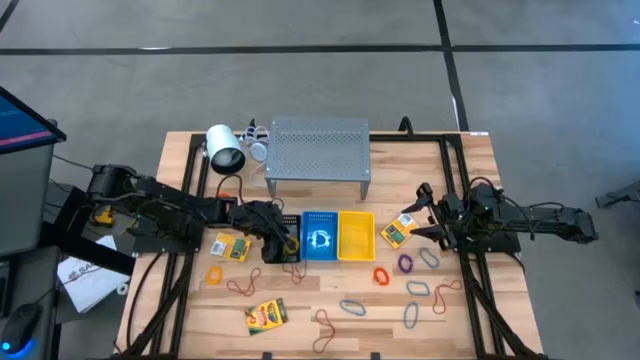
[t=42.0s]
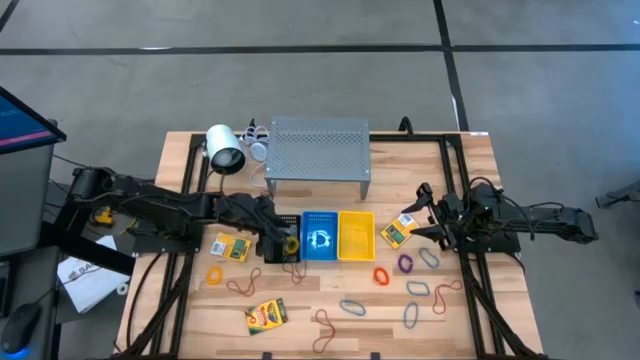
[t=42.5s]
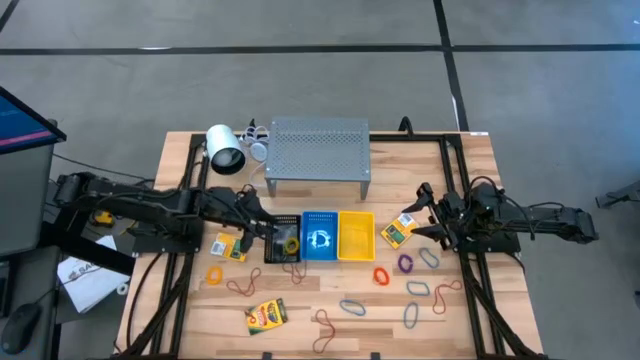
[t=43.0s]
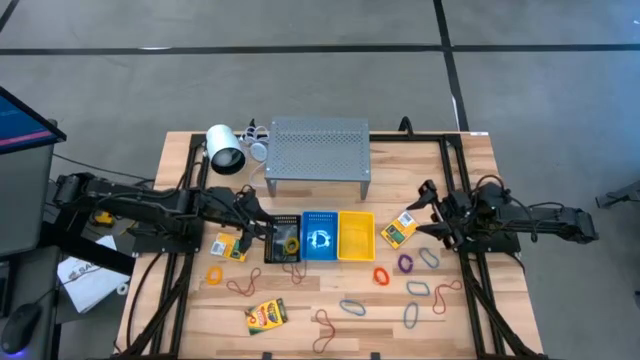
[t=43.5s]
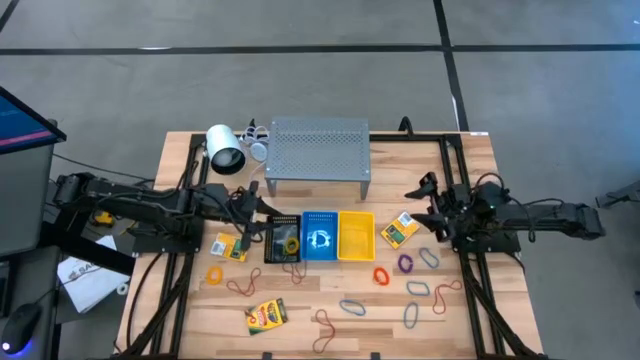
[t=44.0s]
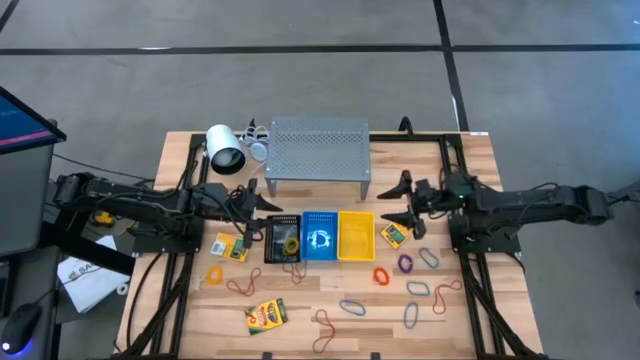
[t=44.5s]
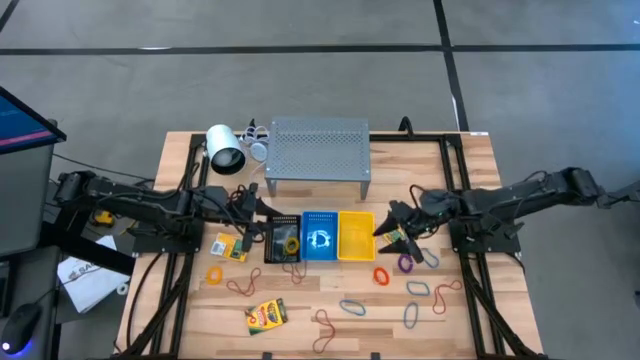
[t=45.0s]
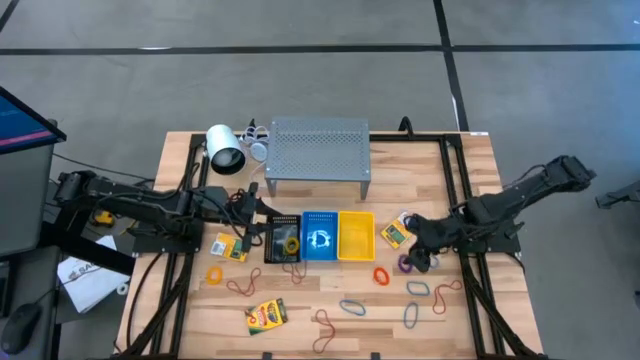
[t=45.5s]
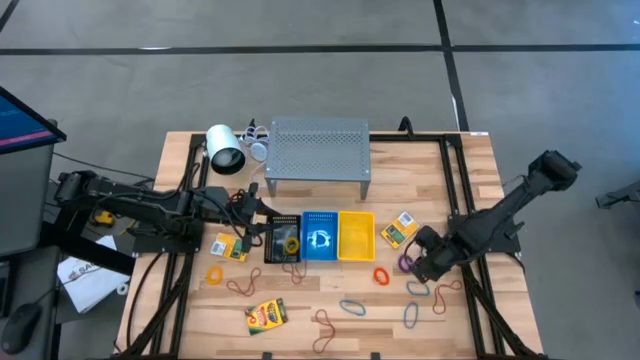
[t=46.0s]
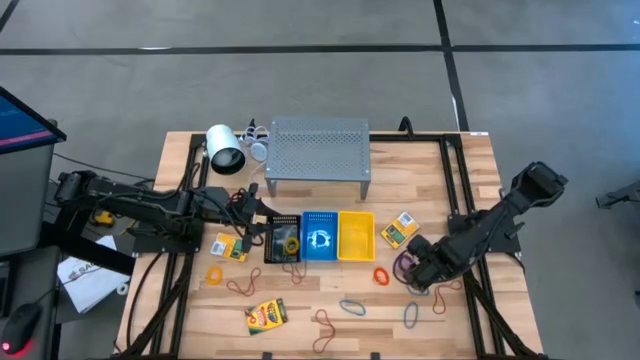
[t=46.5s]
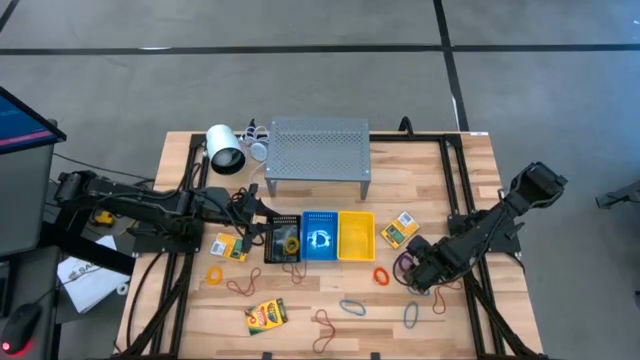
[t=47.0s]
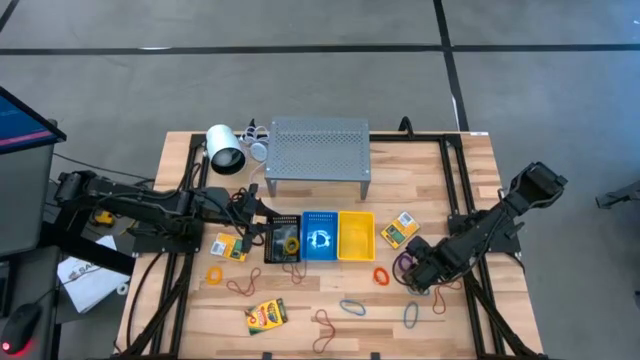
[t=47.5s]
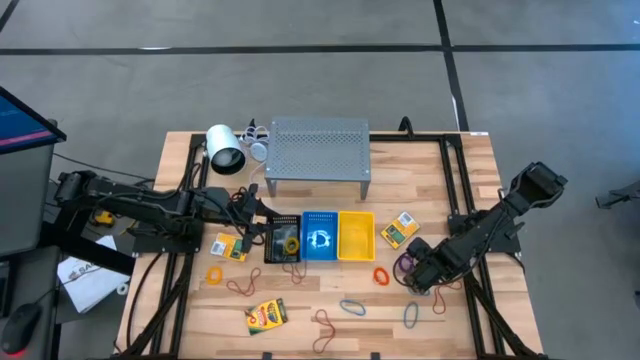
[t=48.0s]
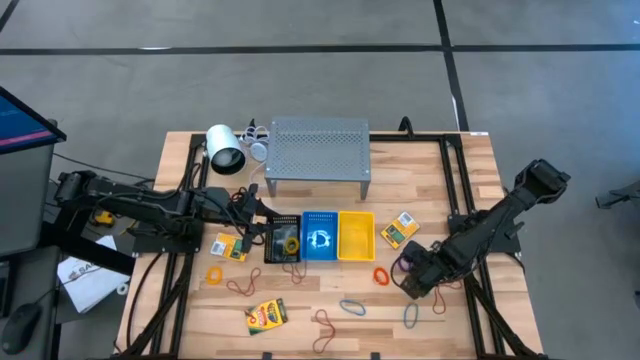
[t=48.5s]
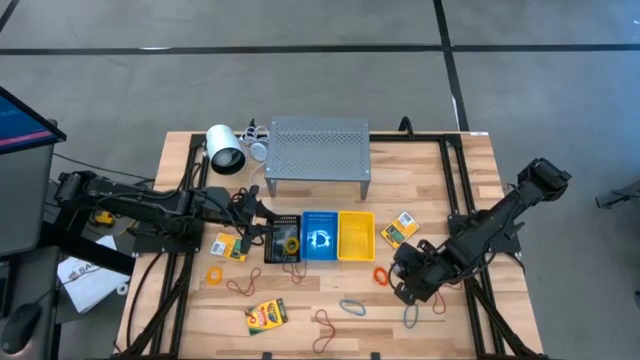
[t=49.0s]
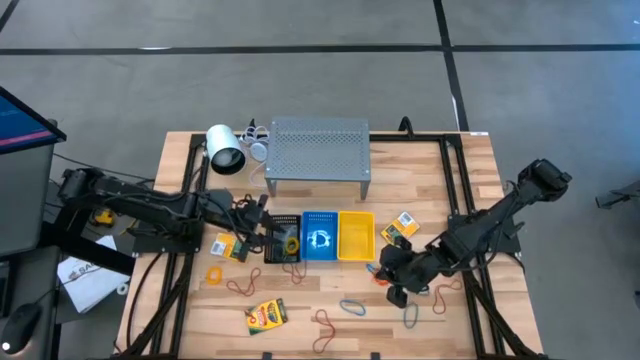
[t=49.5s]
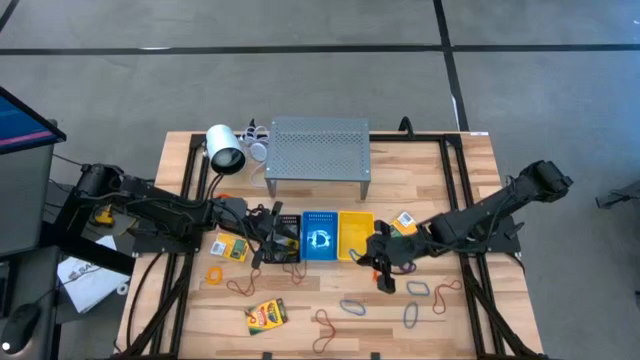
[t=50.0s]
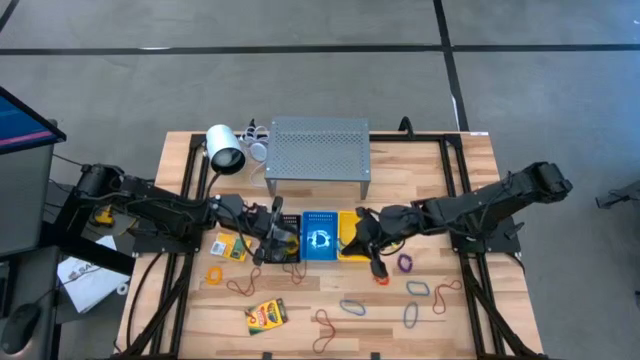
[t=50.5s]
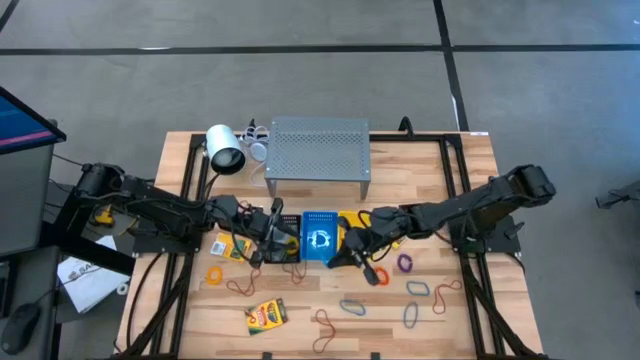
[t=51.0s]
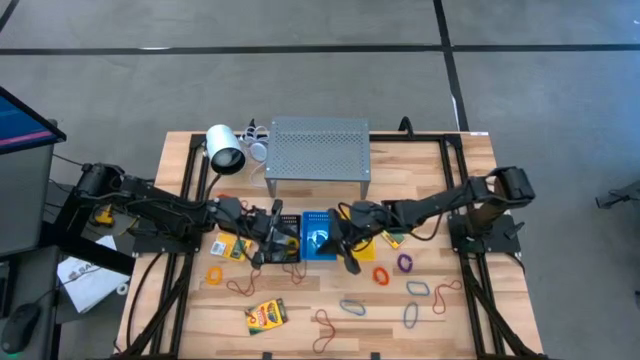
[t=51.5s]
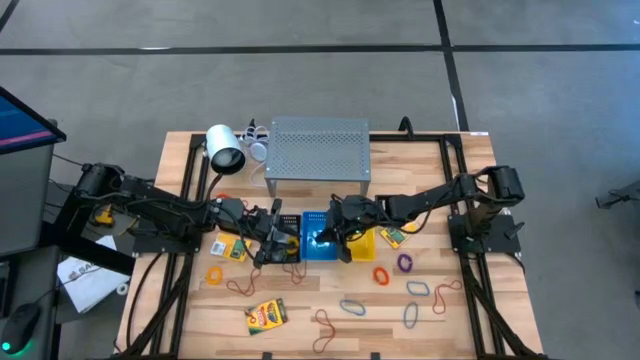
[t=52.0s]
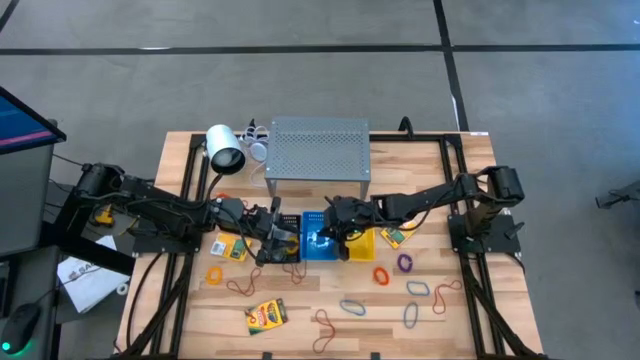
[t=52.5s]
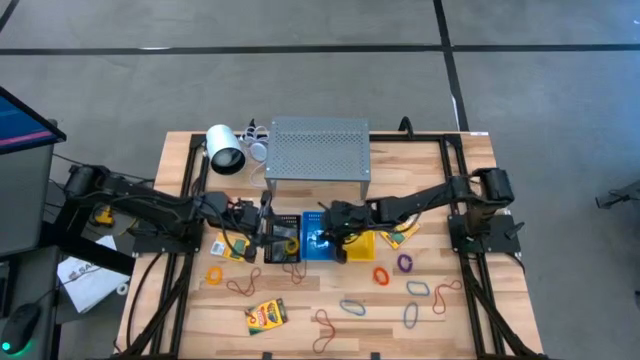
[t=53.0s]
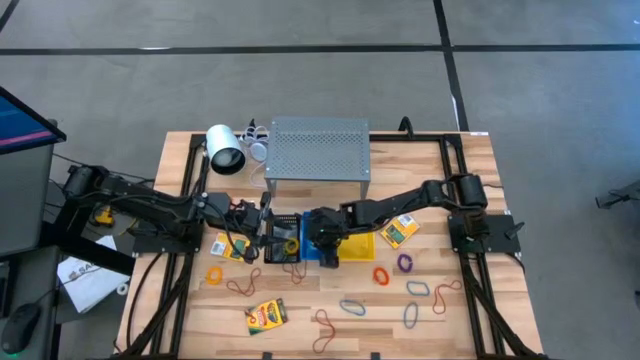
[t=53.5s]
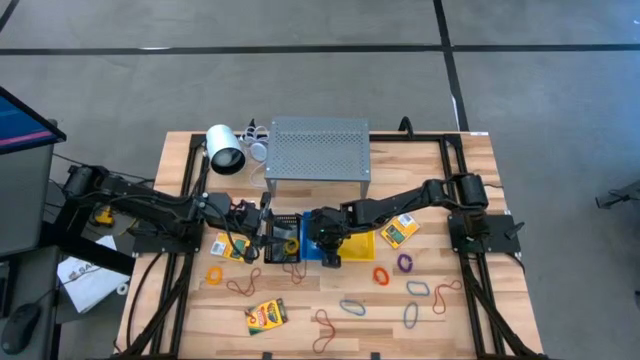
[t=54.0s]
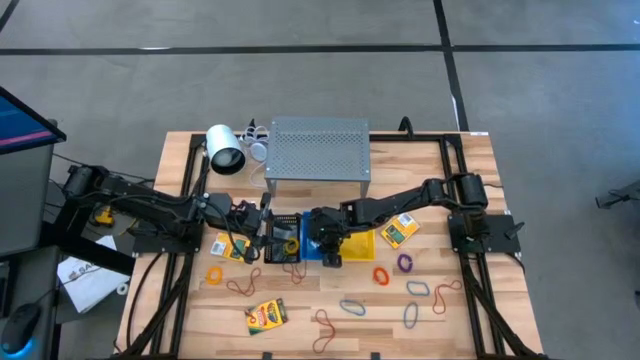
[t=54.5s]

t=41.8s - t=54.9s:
Task: Pick & Place Office Desk Supplies
Put the blue rubber band into the blue basket

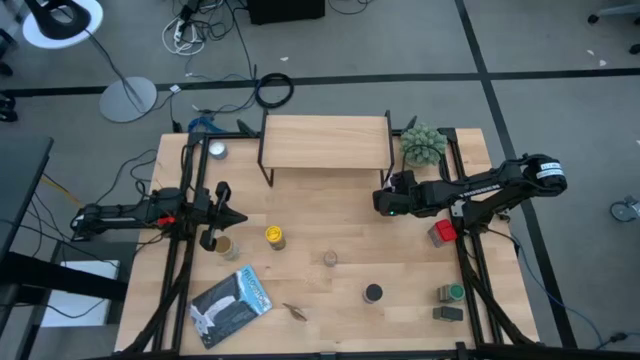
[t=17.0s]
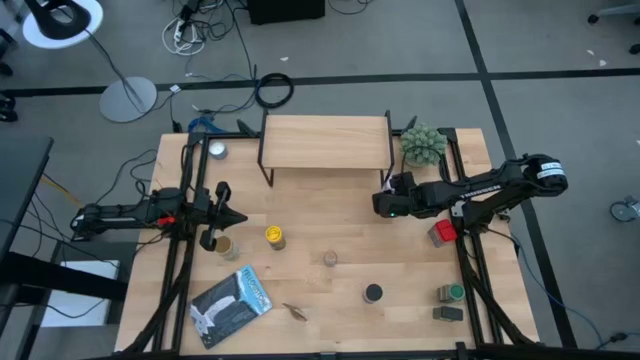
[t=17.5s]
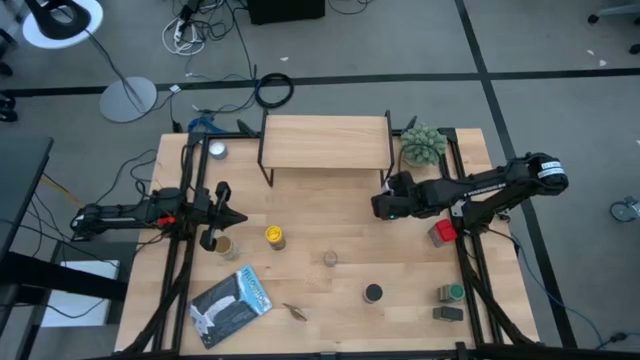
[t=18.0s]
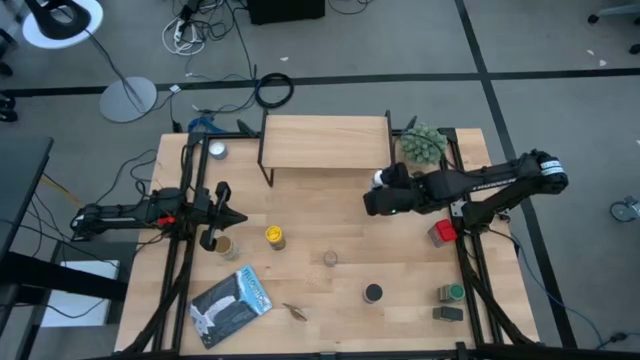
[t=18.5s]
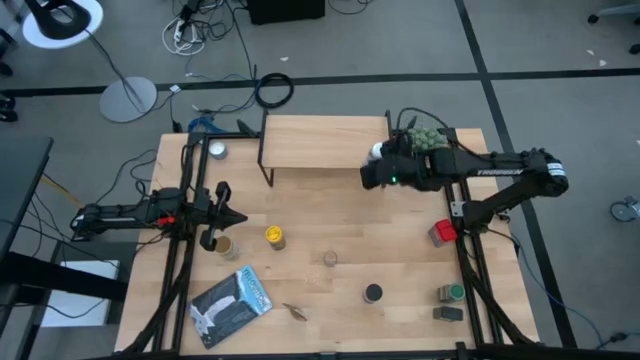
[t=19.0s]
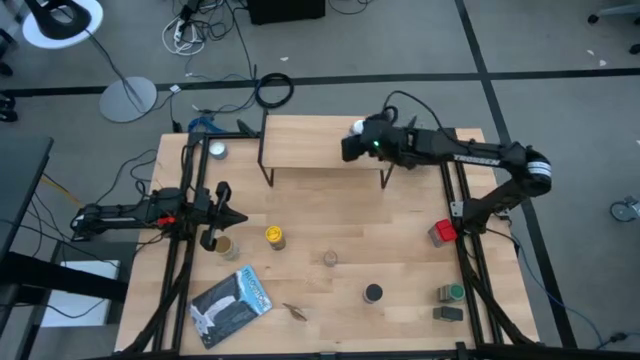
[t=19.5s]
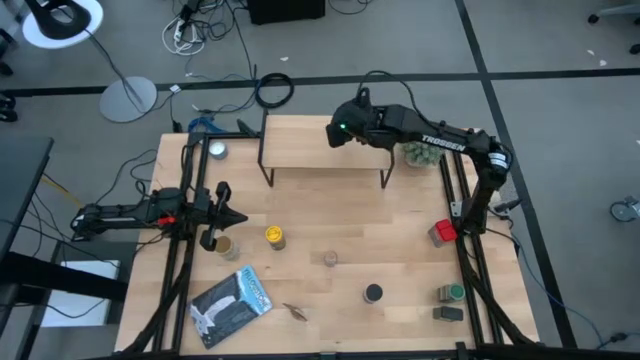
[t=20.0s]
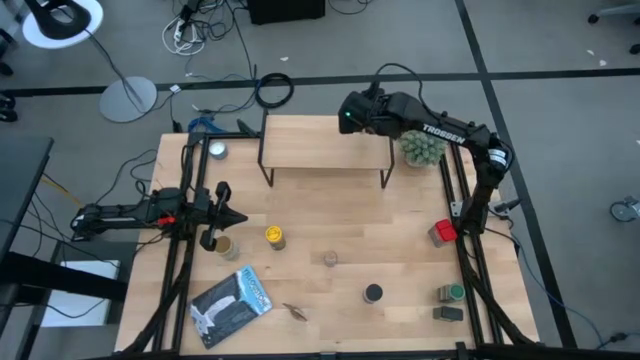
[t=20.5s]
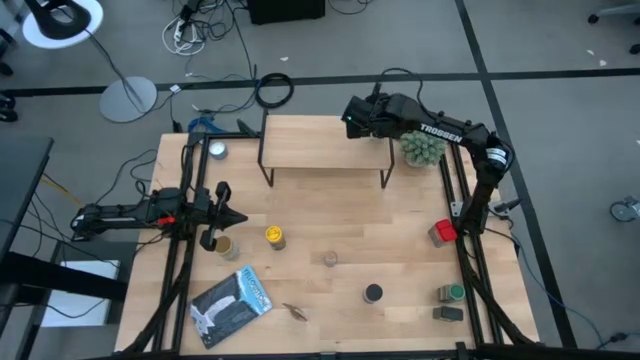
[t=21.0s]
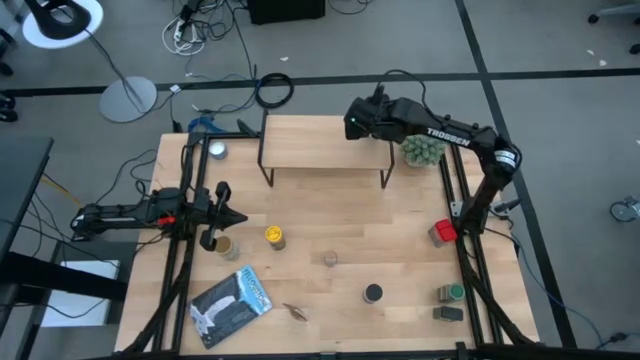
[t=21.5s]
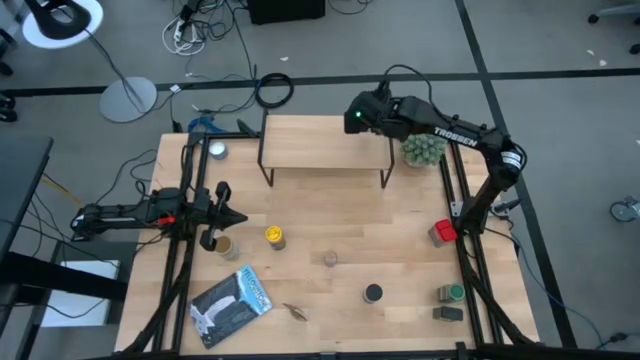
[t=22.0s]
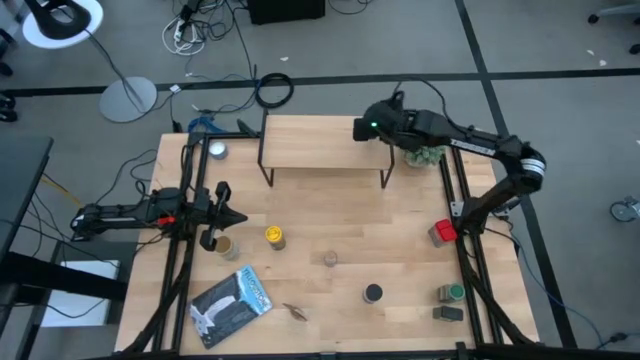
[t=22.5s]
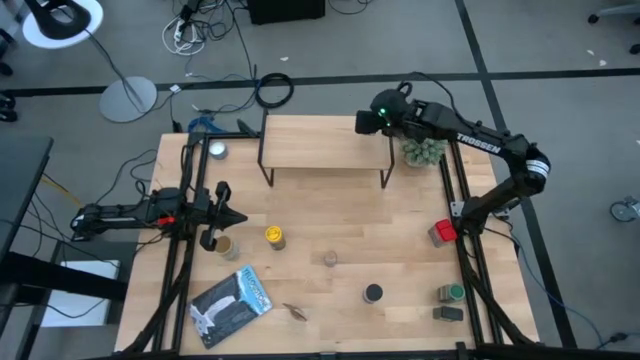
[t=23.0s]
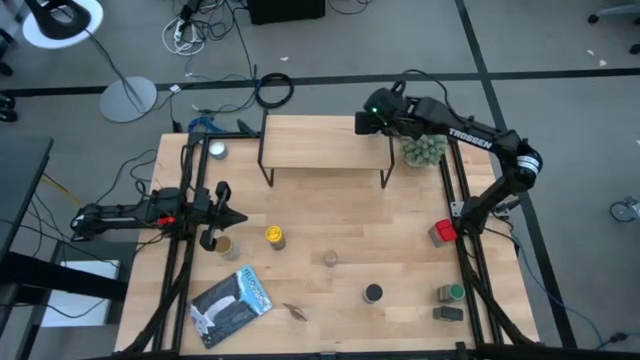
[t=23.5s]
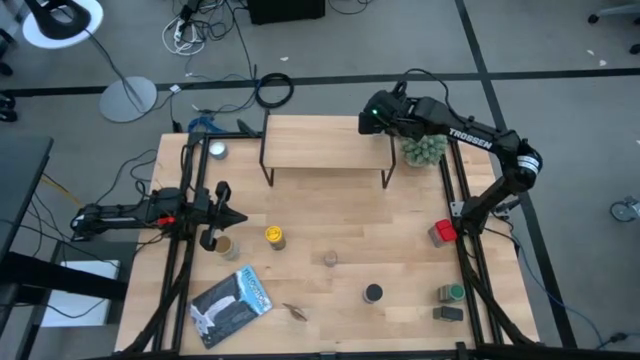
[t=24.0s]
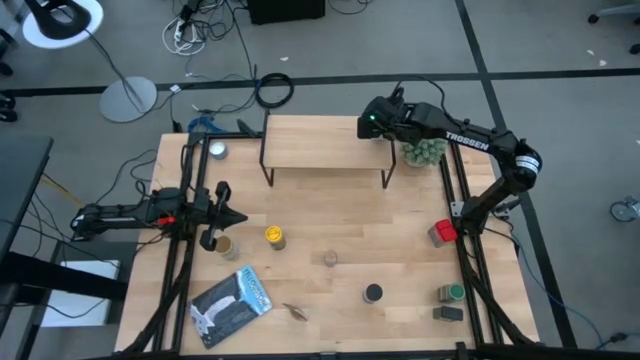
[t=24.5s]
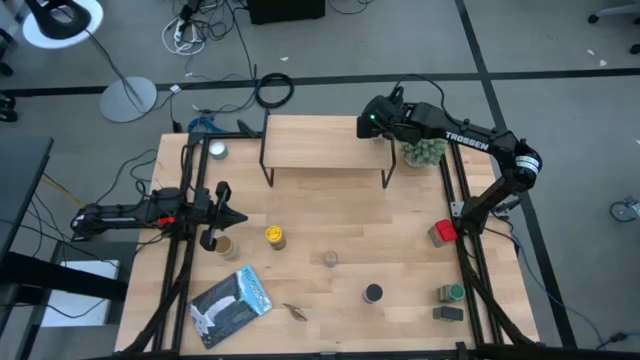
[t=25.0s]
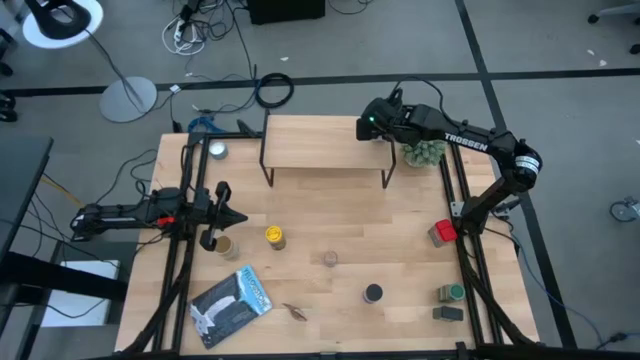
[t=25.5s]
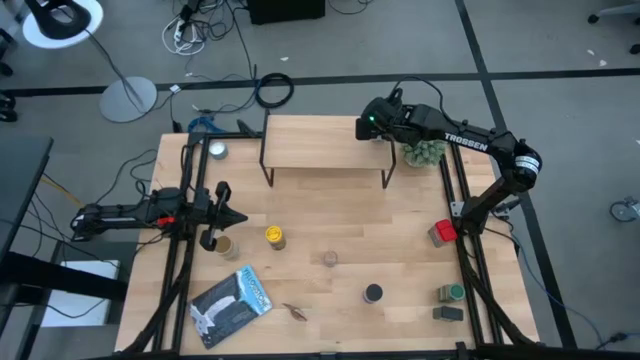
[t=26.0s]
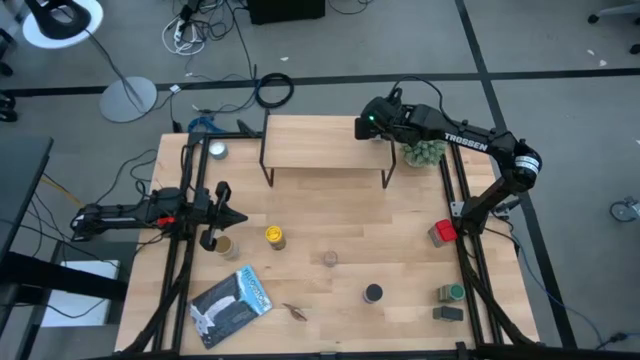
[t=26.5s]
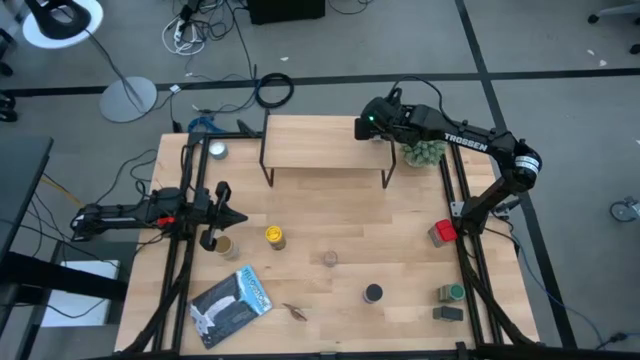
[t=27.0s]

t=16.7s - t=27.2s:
Task: Shelf spices
Put the white seasoning bottle on the shelf
